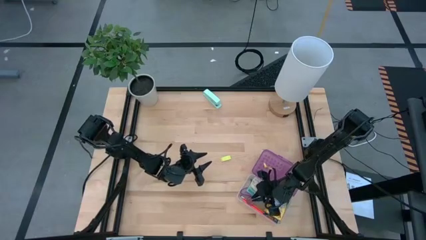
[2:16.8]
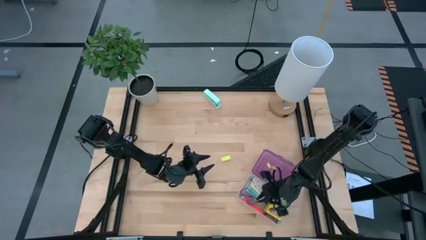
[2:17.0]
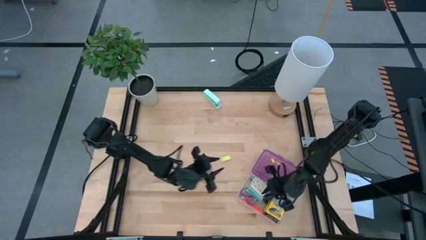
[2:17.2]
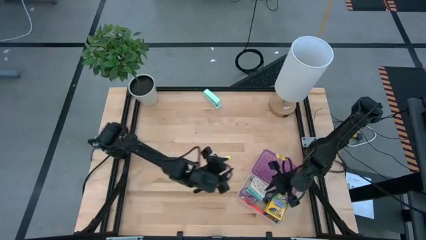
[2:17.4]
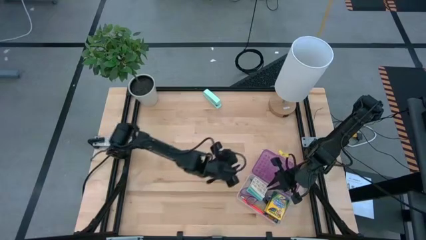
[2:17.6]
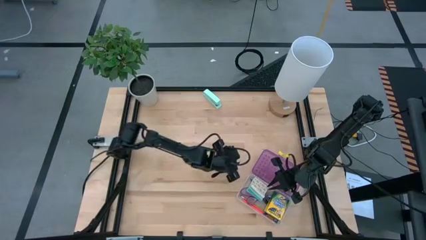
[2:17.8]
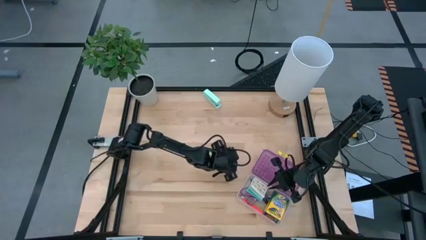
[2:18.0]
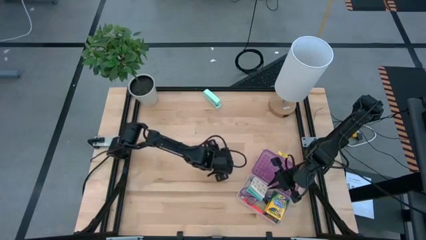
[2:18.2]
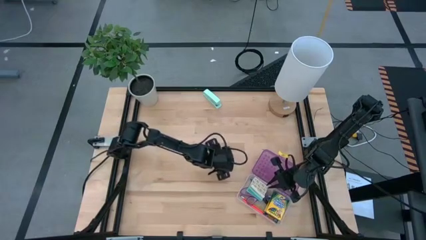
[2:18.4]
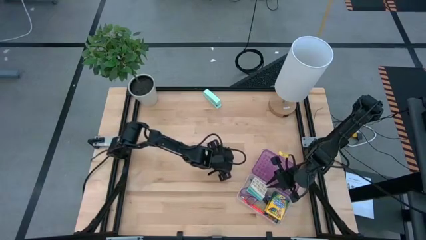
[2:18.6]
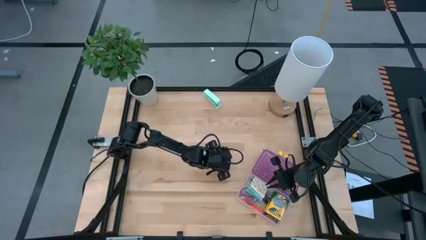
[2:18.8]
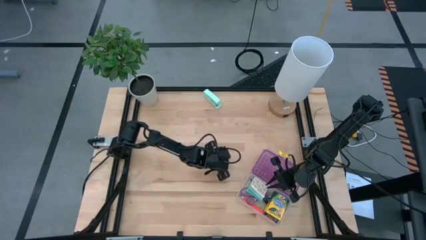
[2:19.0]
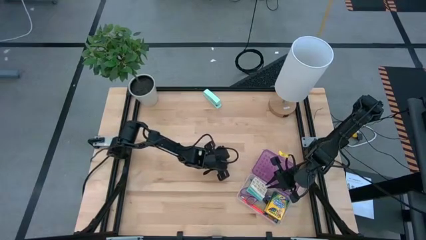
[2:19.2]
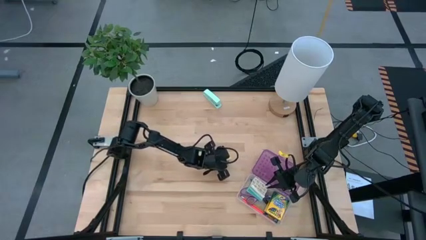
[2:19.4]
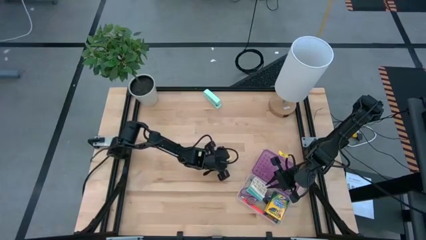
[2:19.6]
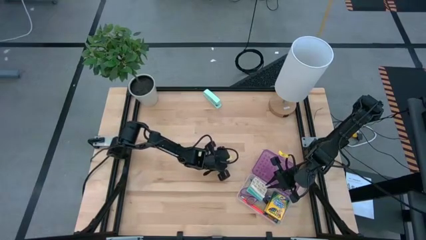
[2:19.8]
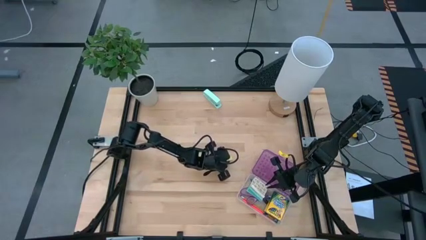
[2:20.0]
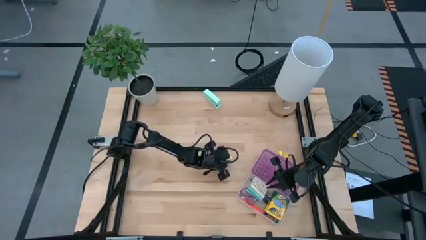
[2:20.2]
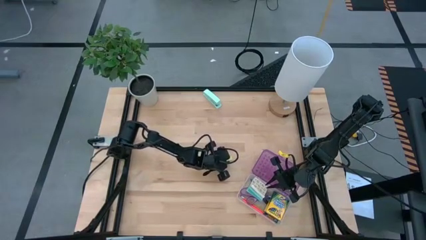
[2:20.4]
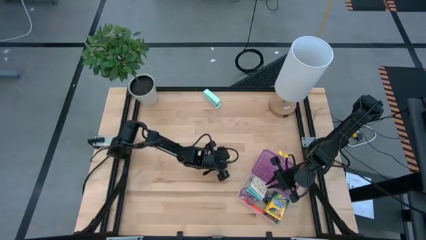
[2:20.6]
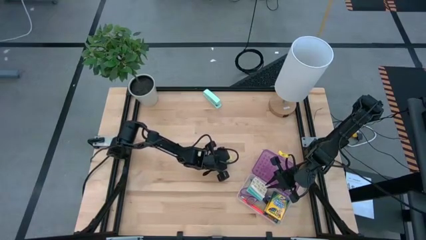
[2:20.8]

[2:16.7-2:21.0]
Task: Pack school essentials
Put the green eraser into the violet supply box

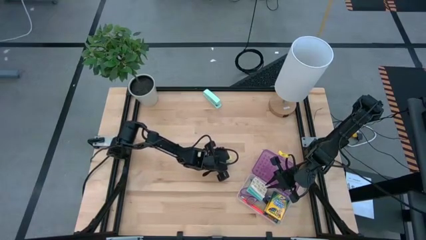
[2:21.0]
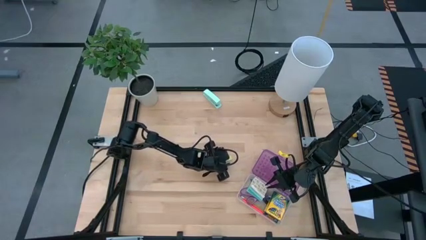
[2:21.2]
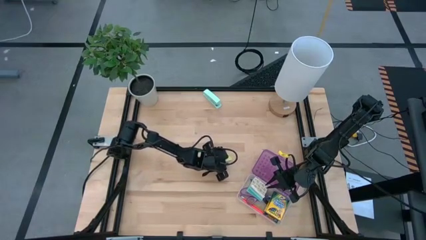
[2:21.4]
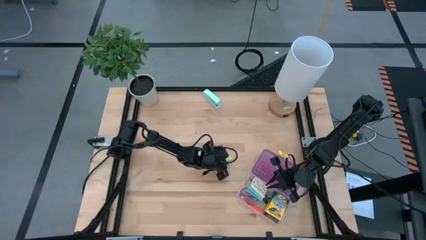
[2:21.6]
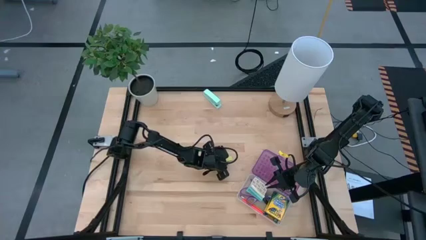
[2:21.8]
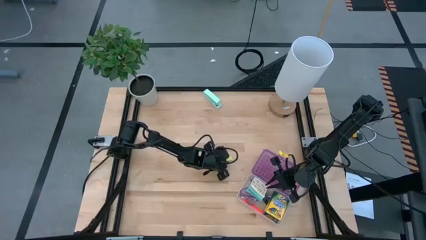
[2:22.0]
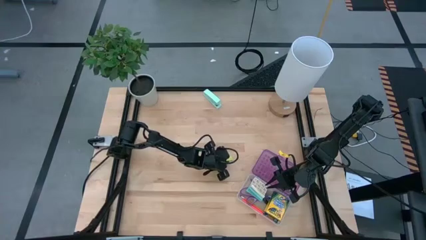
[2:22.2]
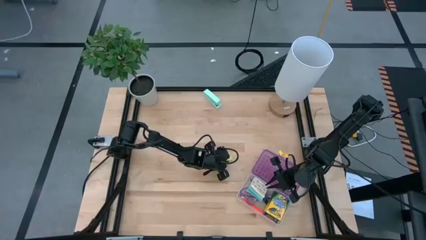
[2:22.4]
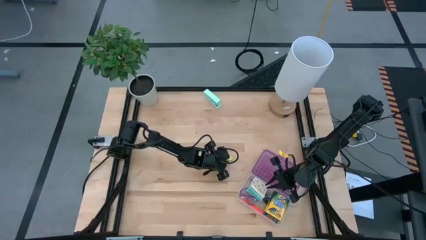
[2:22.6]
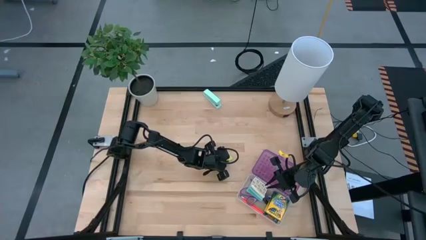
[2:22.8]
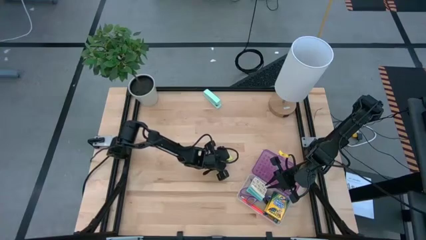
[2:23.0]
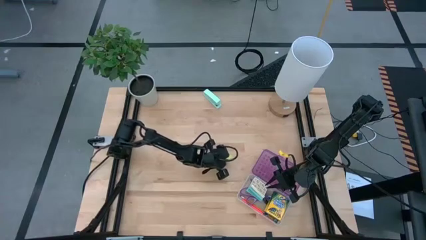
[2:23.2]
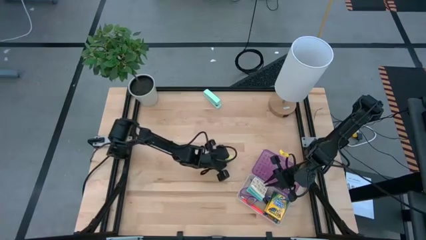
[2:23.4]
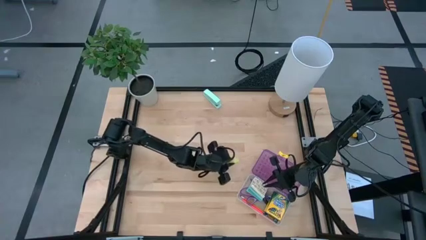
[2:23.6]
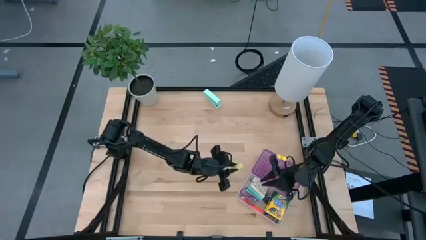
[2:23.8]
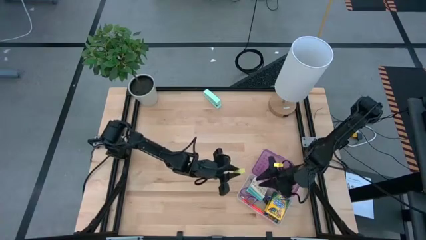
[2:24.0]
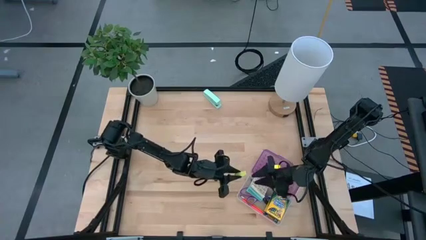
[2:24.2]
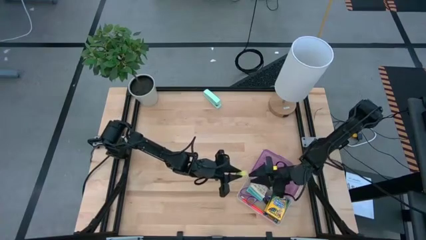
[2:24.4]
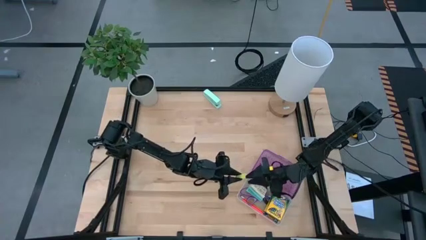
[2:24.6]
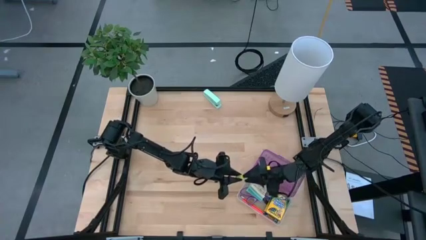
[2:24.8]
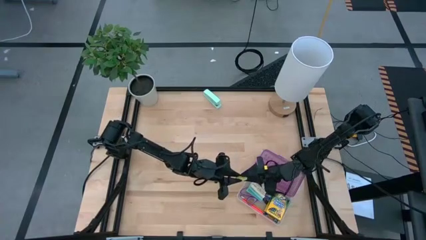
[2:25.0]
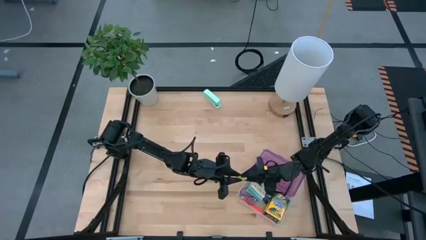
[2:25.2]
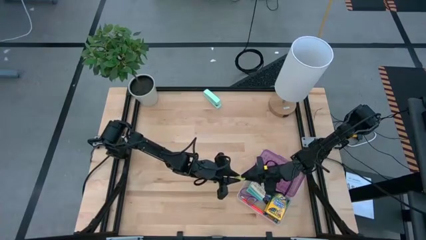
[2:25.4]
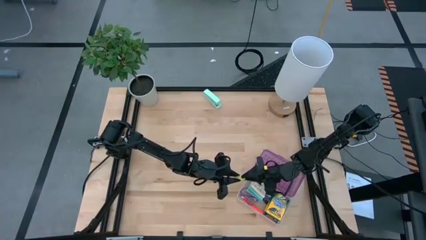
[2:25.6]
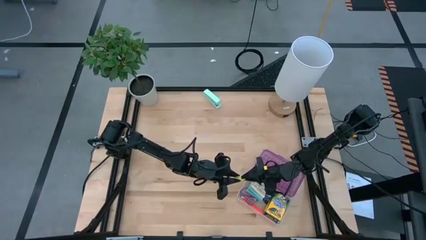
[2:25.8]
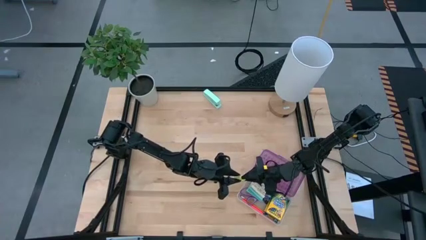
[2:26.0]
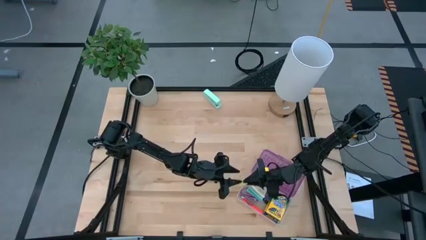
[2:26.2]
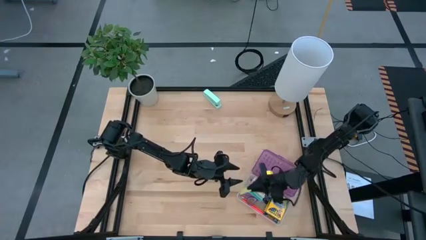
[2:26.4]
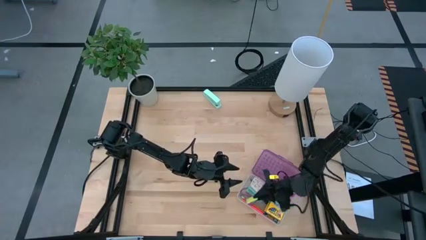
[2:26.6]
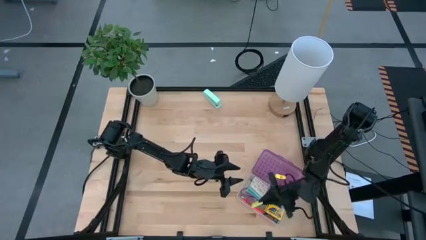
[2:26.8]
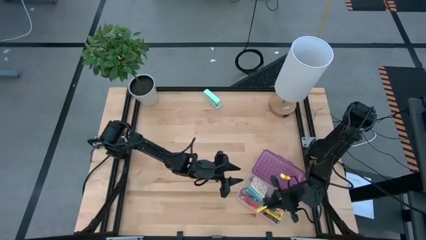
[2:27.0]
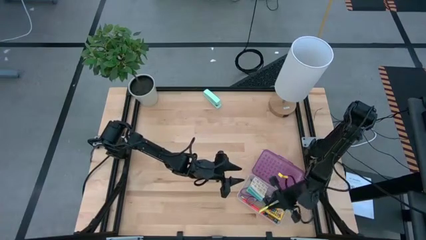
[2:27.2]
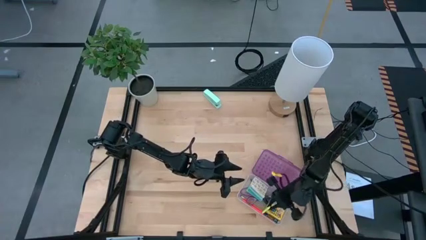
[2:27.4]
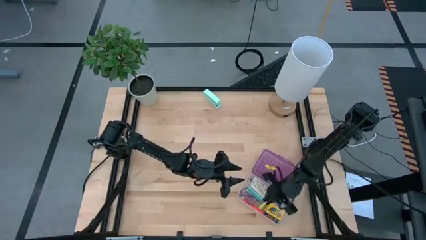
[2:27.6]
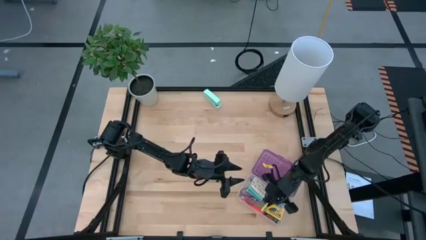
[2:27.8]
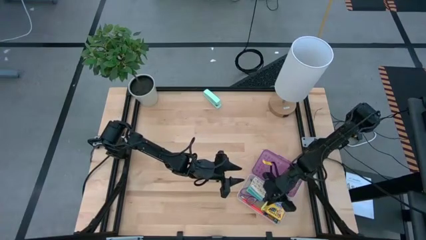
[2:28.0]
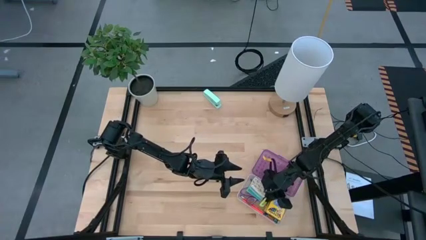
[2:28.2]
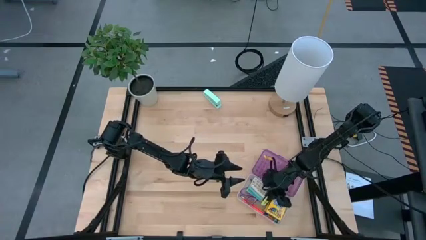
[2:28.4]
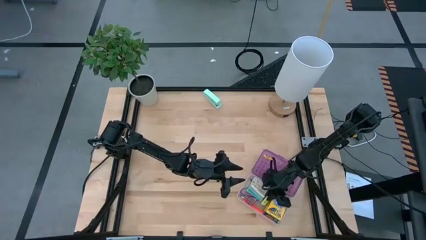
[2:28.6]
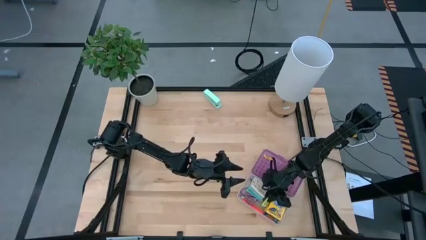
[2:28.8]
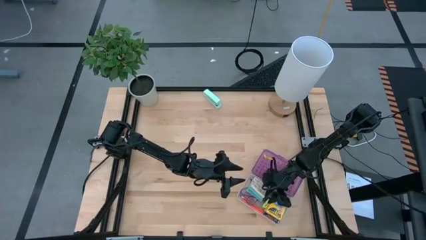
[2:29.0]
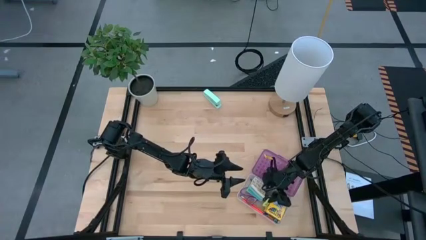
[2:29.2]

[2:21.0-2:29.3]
Put the green eraser into the violet supply box

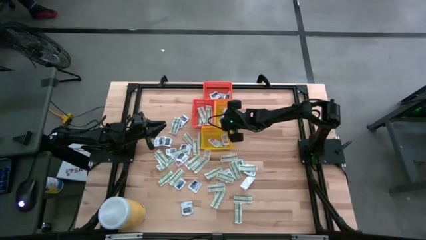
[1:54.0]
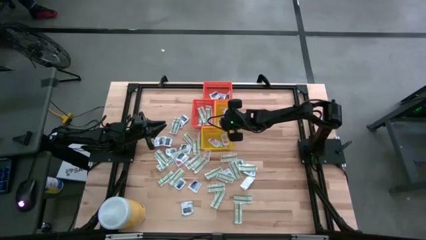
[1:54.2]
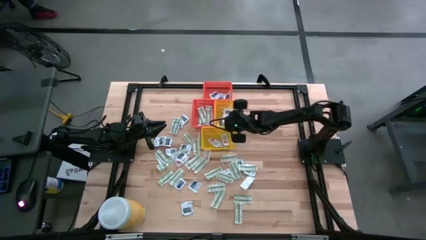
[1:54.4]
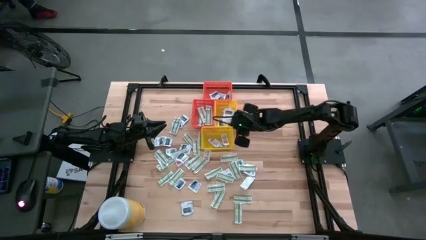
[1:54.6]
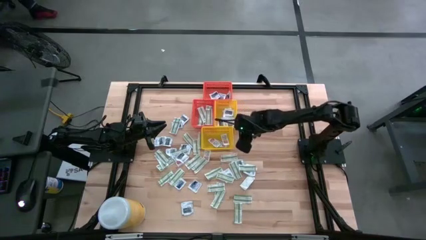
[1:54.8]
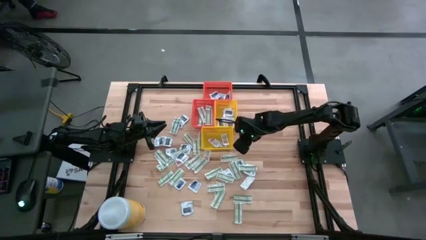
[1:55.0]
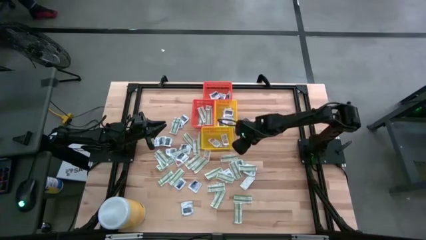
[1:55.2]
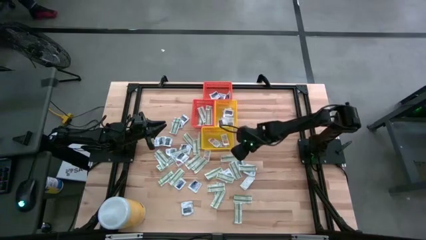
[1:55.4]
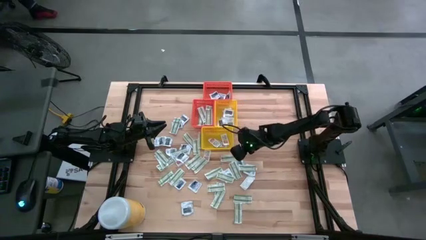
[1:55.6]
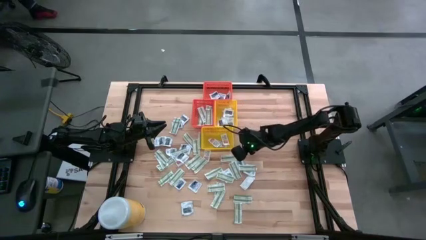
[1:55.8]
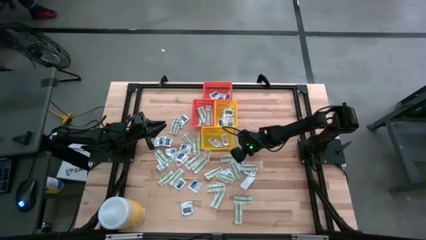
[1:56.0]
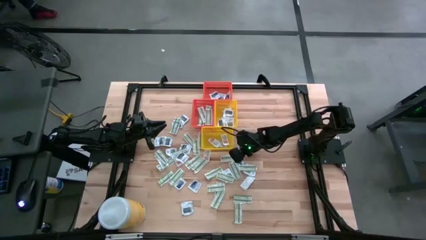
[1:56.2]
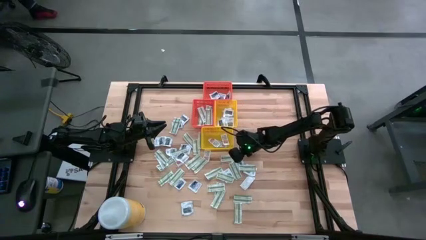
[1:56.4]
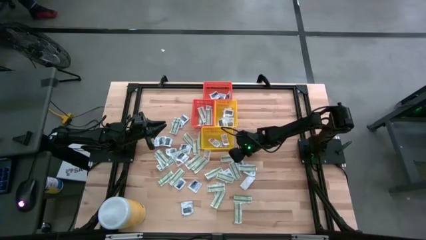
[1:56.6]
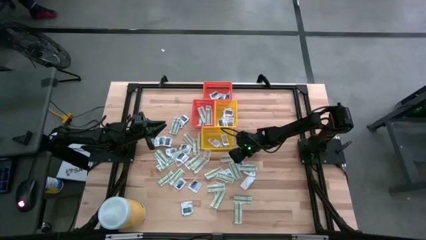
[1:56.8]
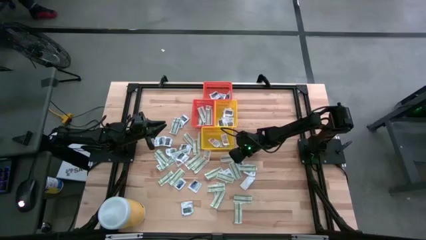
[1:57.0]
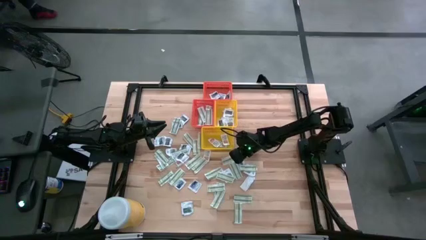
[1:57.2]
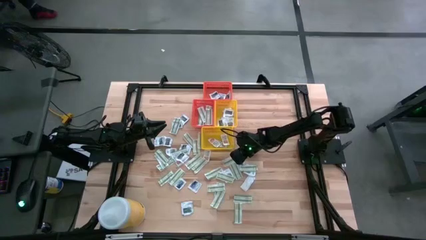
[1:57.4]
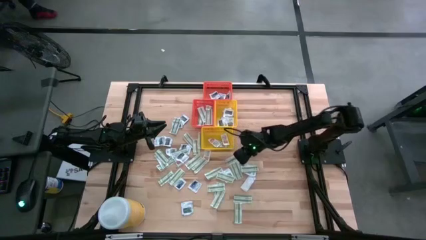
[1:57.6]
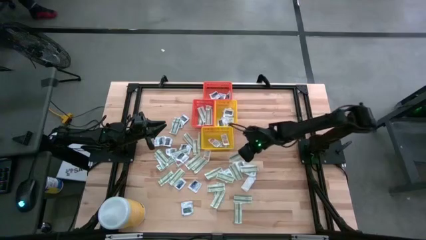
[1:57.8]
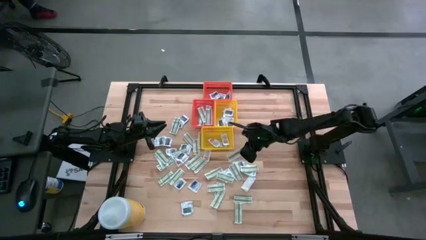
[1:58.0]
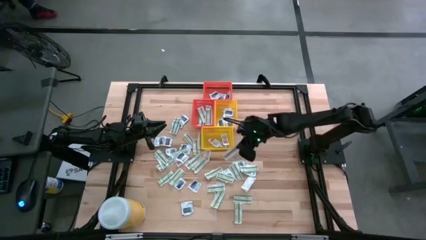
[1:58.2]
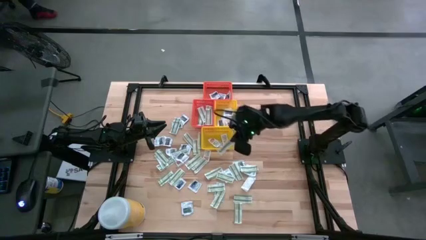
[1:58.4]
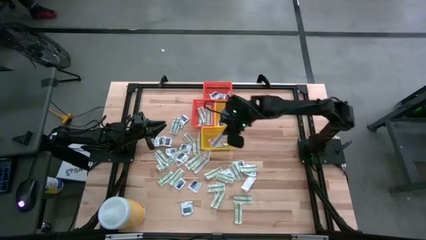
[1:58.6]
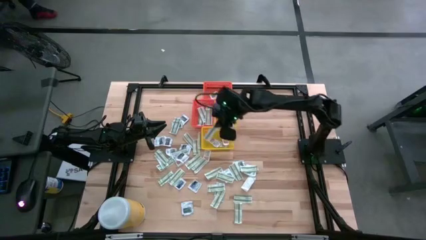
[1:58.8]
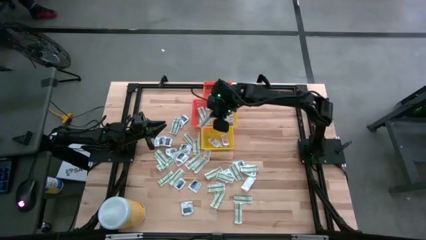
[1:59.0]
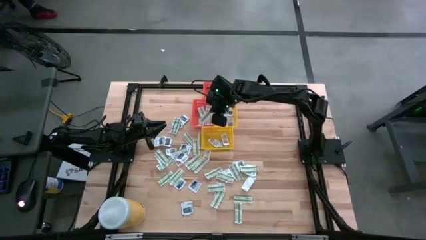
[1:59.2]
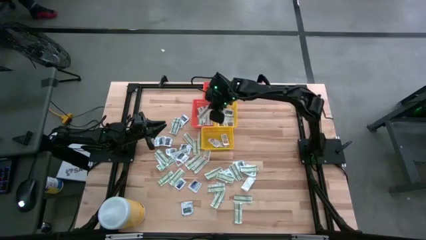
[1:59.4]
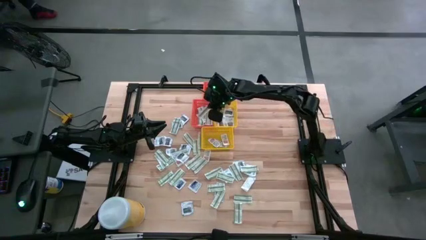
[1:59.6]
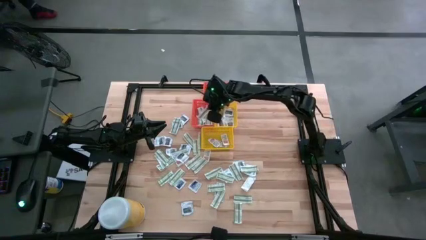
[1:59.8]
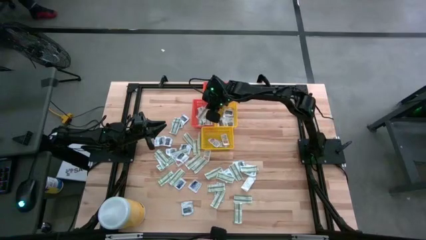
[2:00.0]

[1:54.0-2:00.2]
Task: Pick & Place First Aid Supplies
Put the bandage into the bottom orange bin
